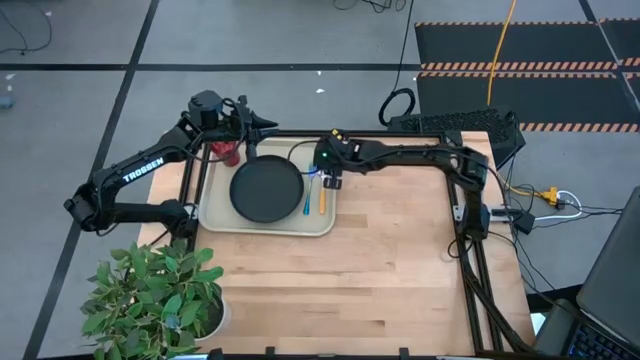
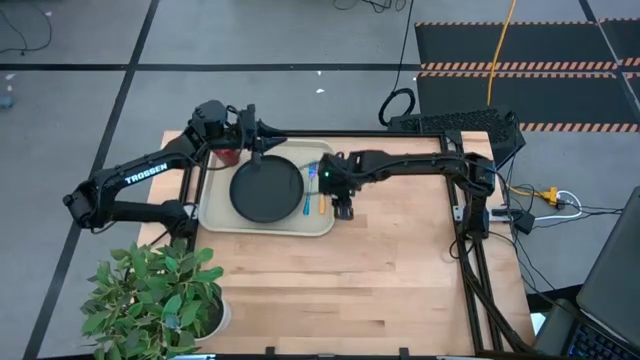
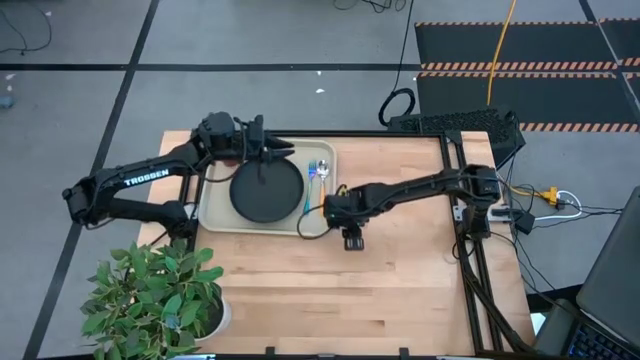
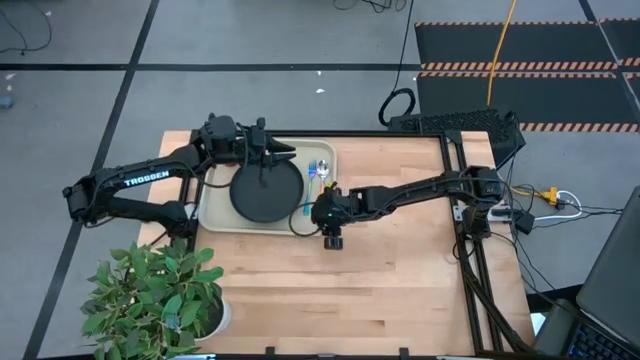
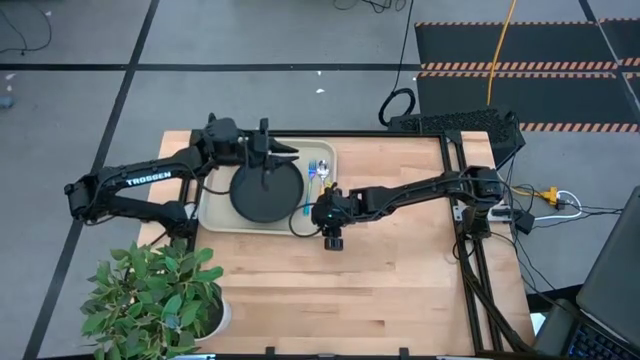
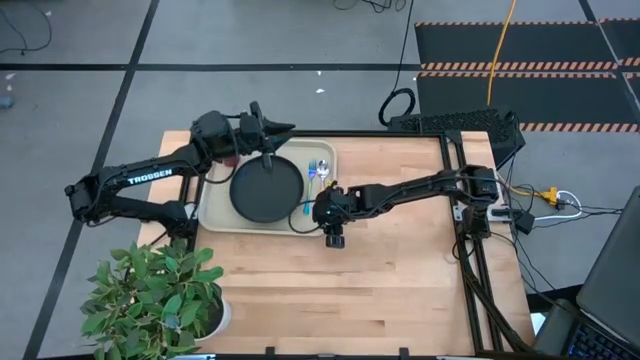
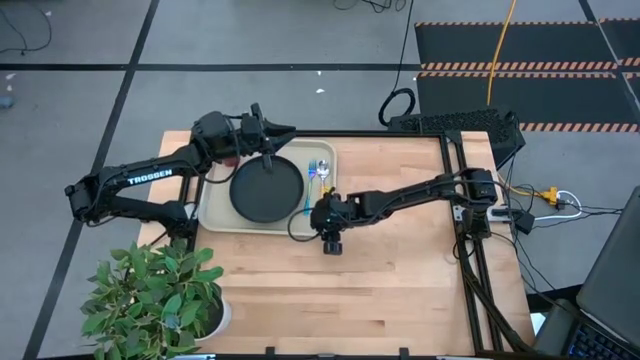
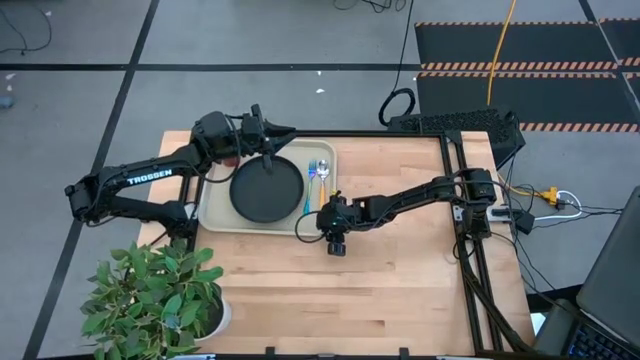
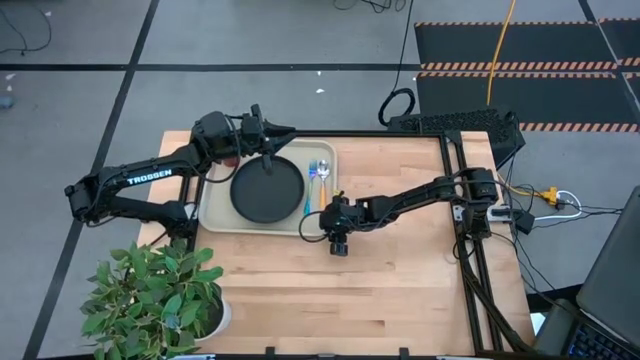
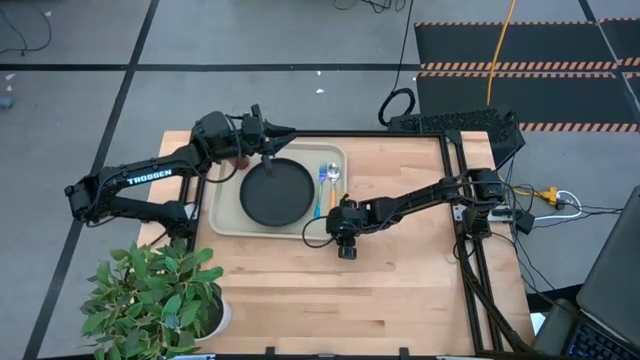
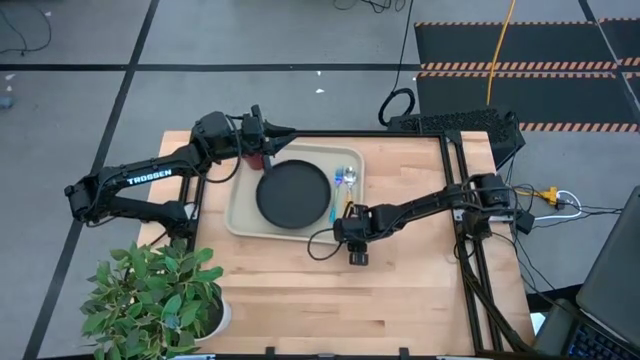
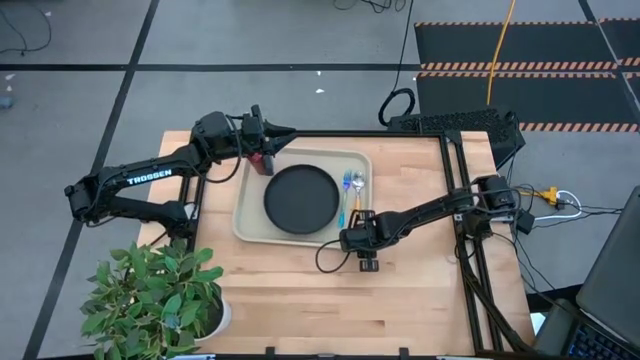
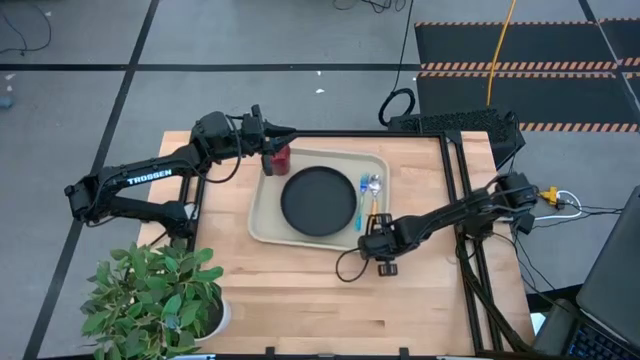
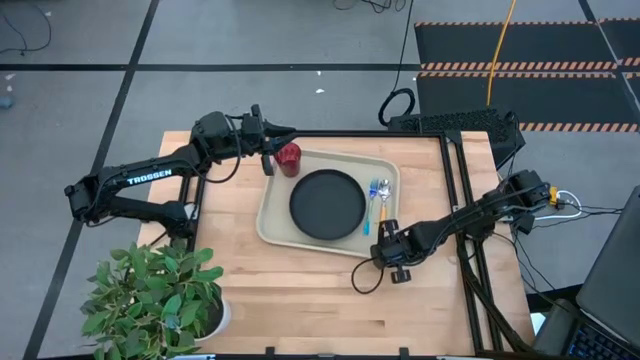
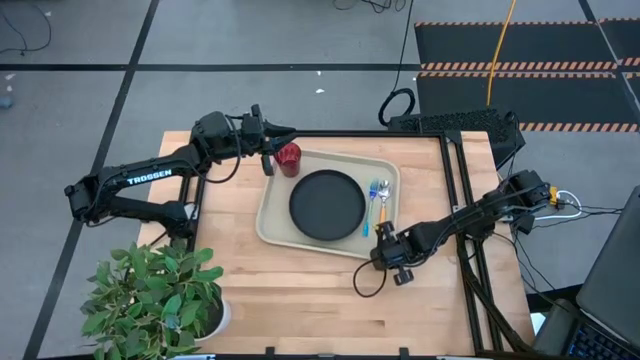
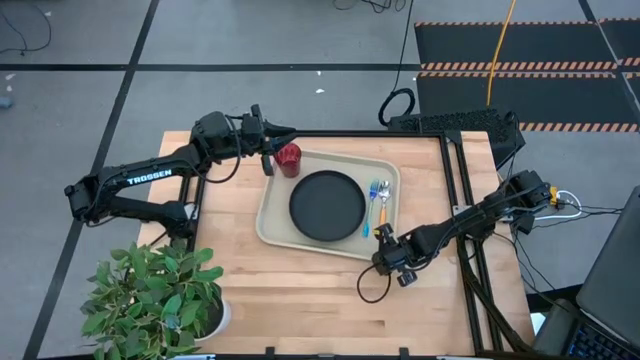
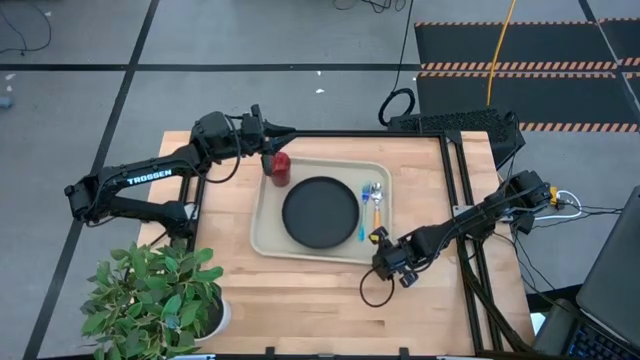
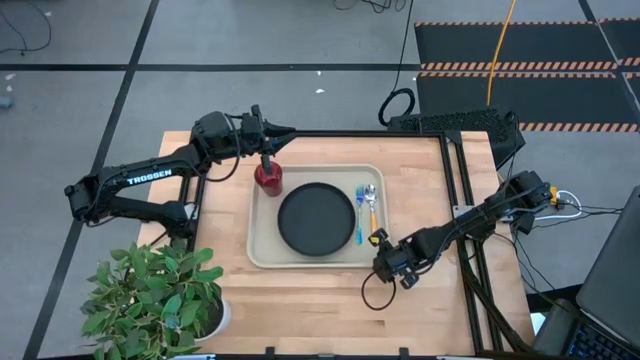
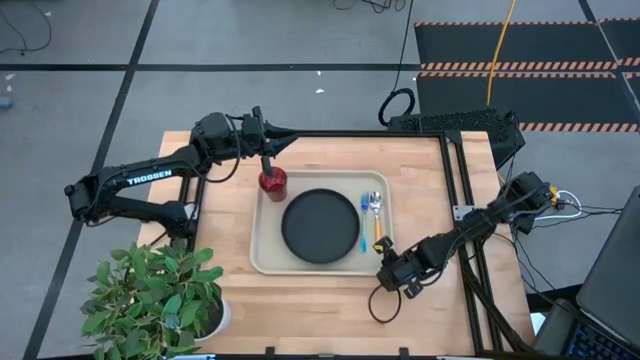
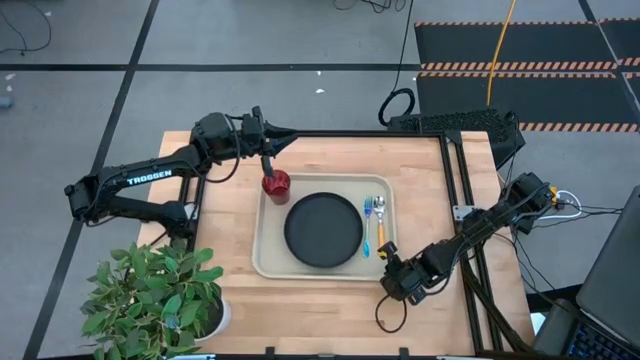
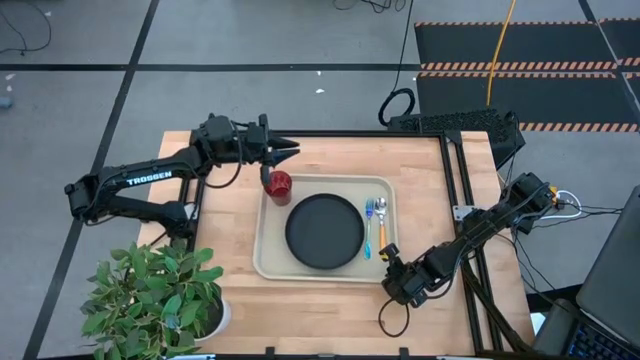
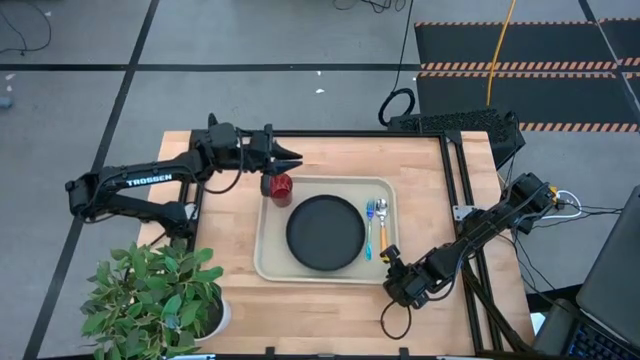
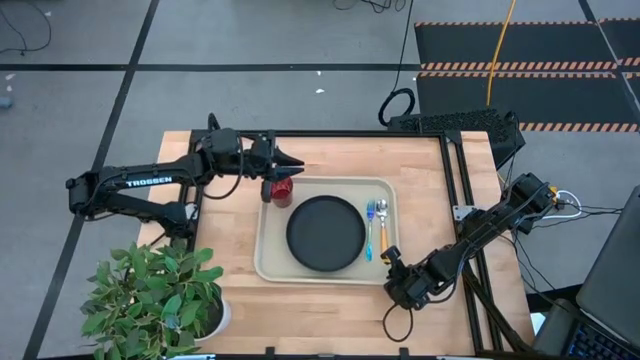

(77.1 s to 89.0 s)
Task: Pick and place plate/cup/fork/spoon on tray
Adjust the gray tray

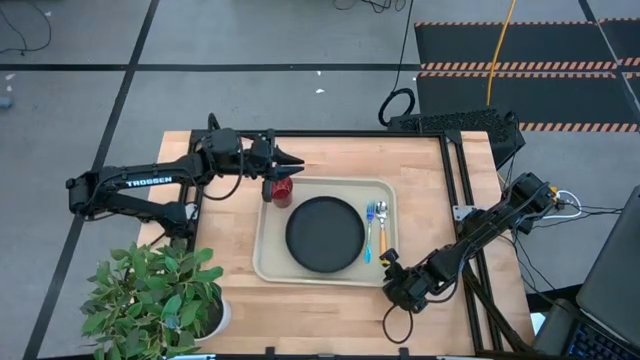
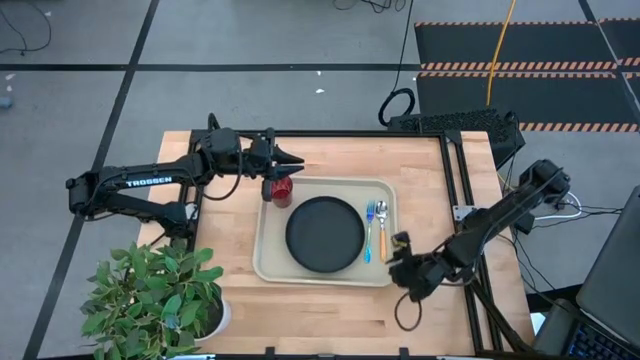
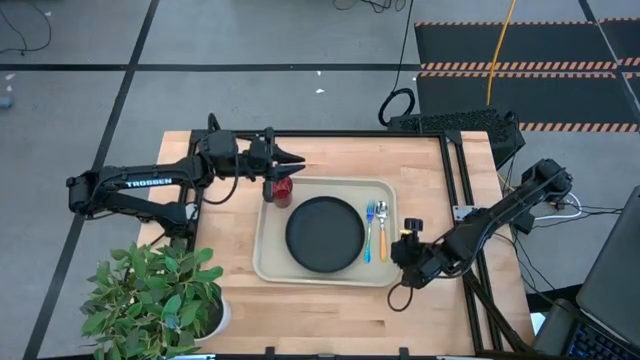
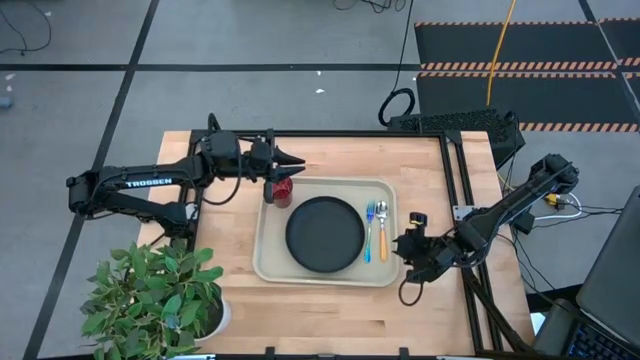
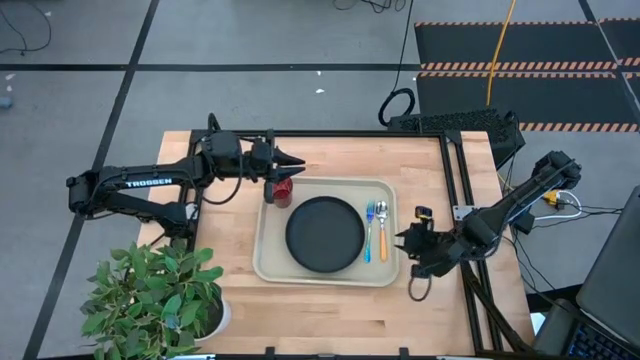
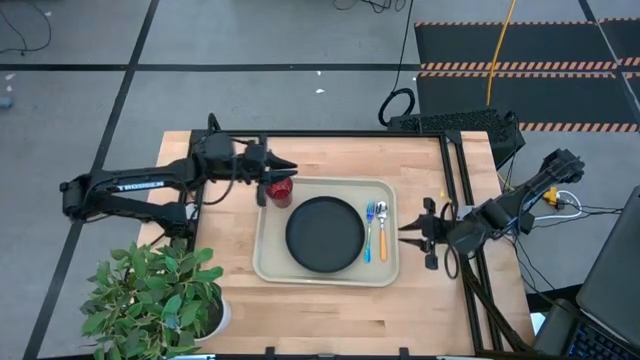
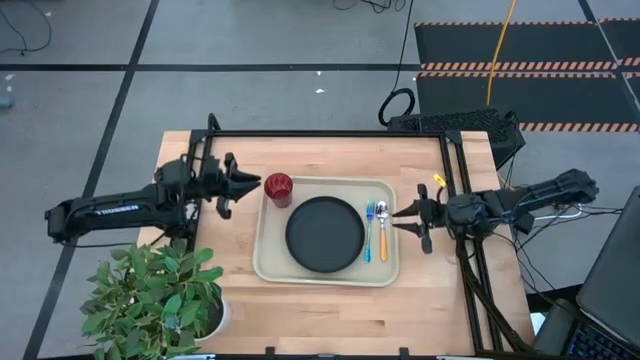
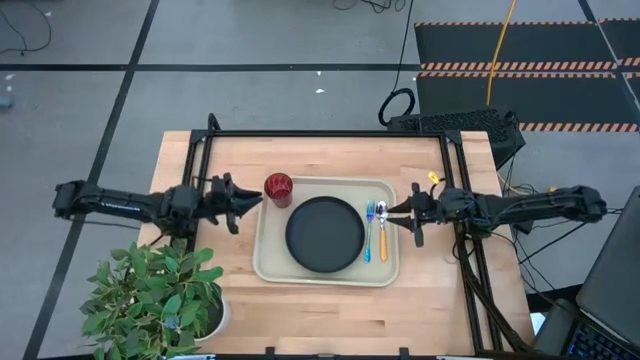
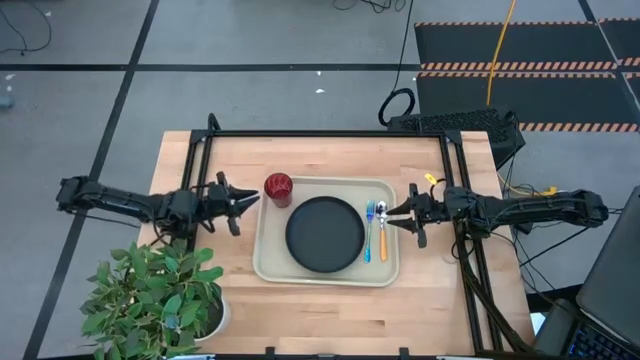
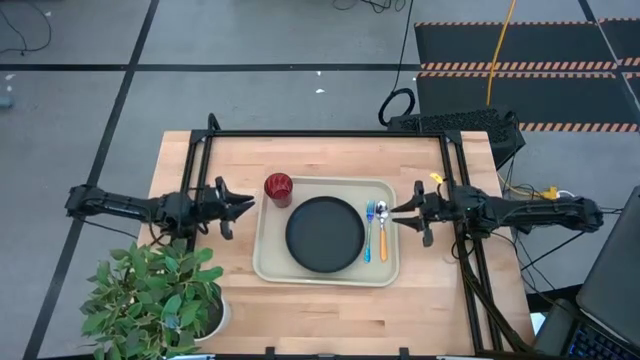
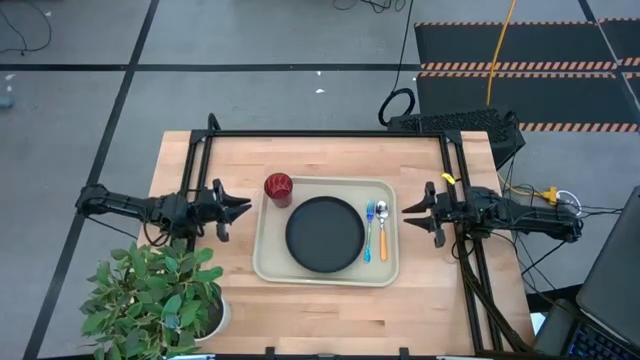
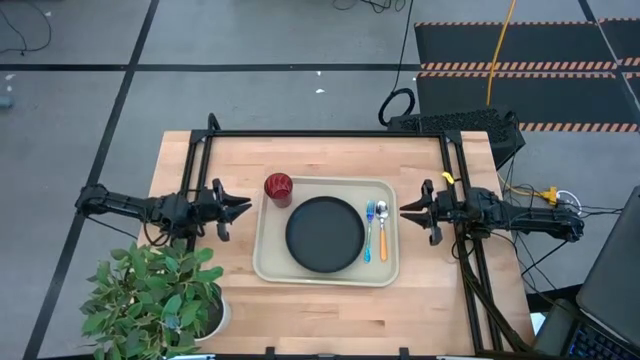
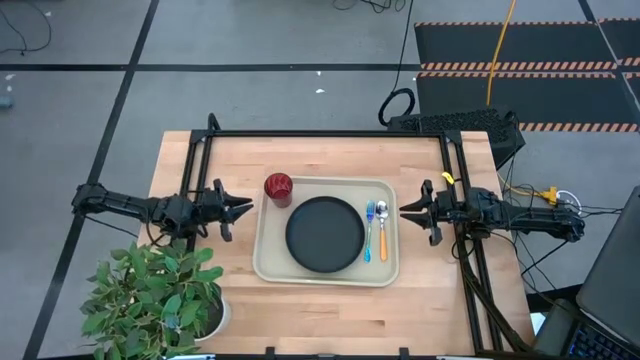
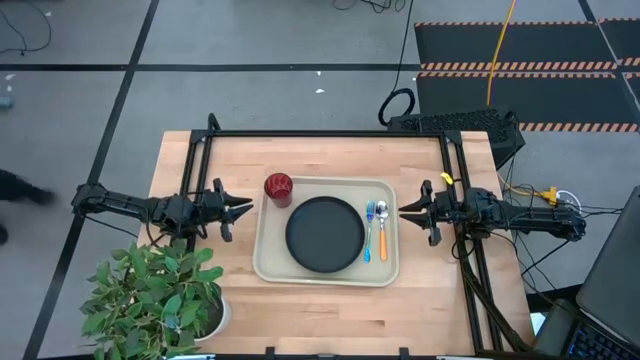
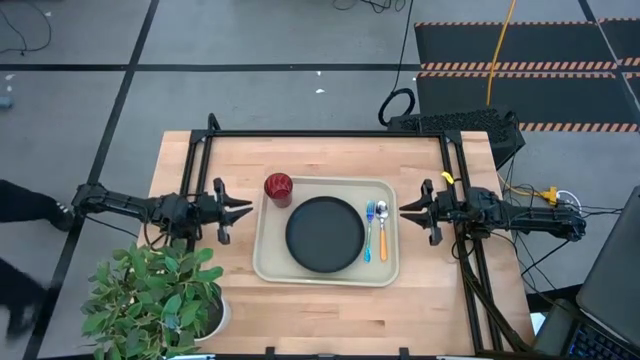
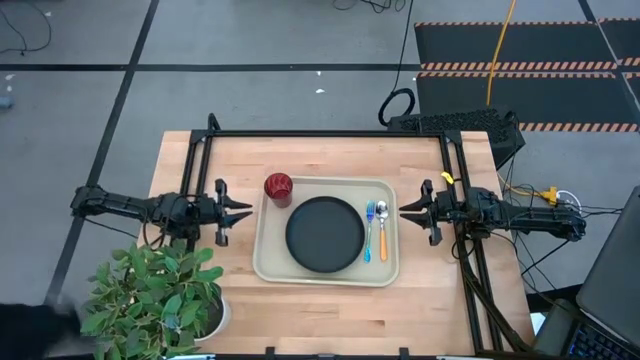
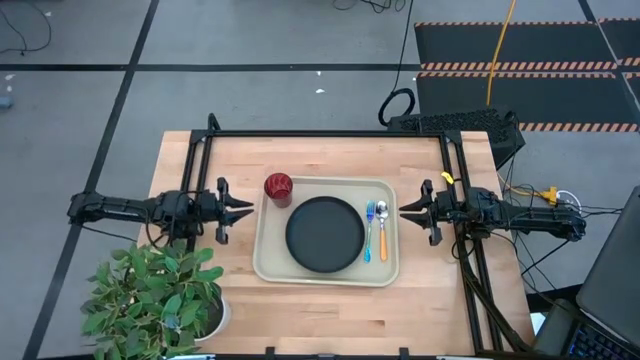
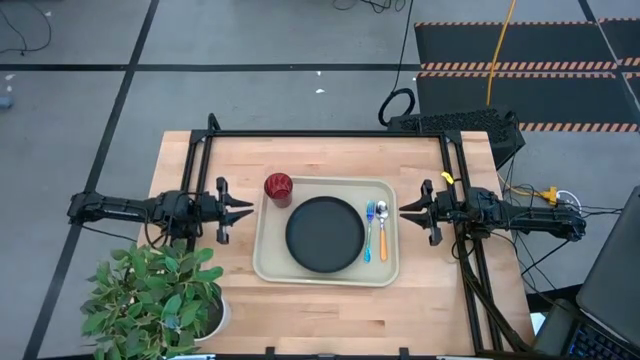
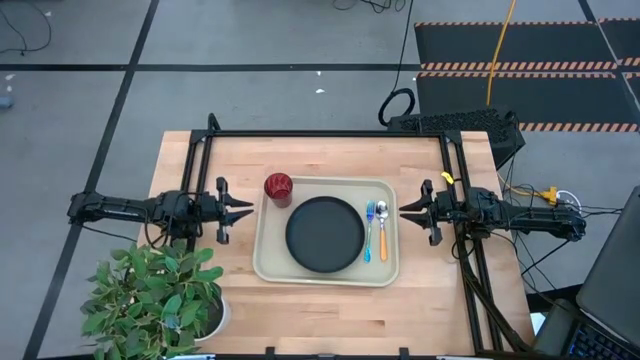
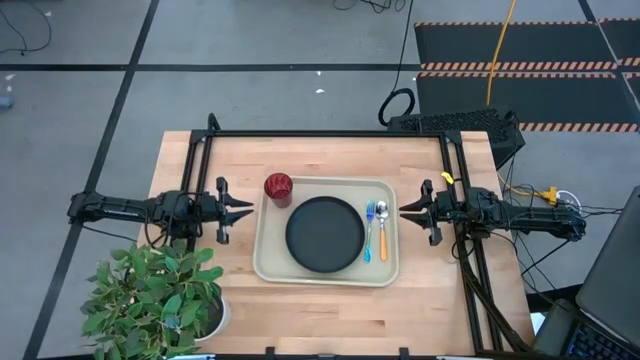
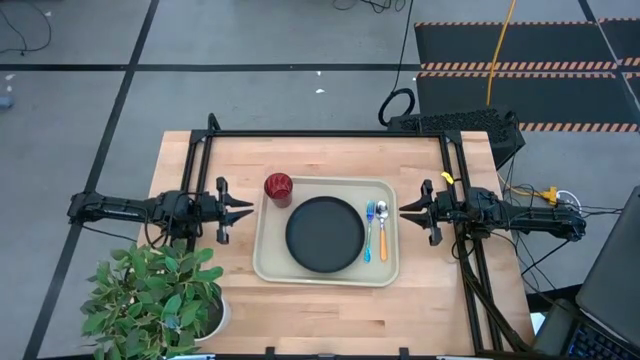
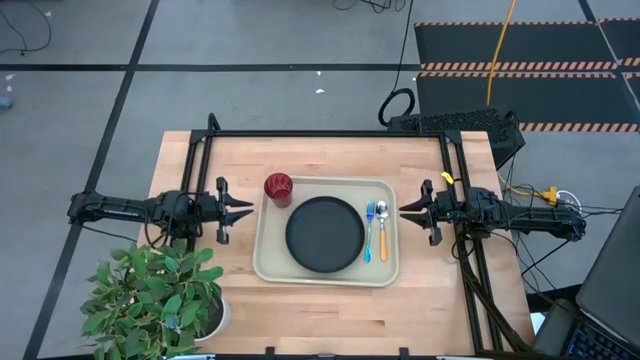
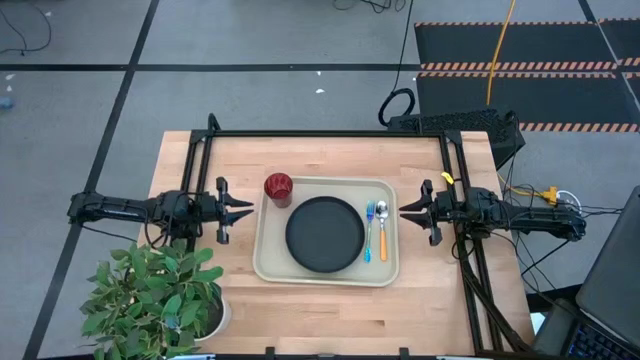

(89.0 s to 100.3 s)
Return to Home Position
